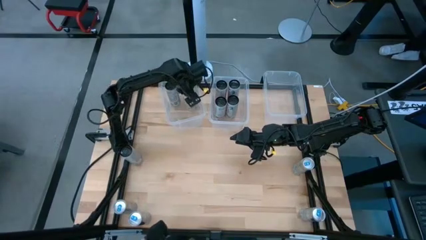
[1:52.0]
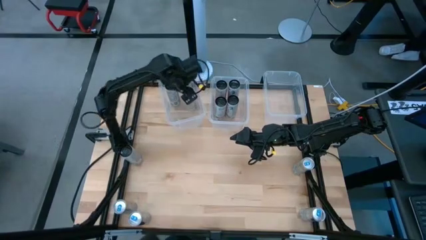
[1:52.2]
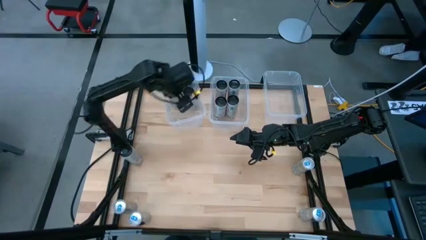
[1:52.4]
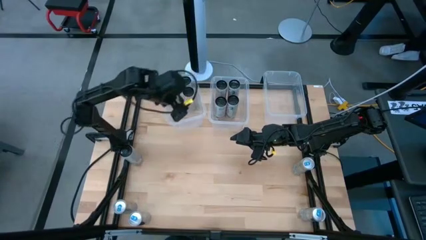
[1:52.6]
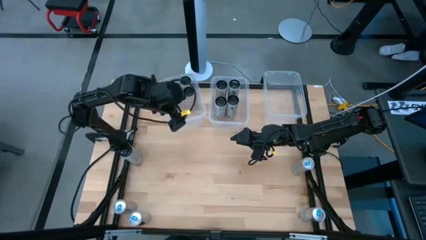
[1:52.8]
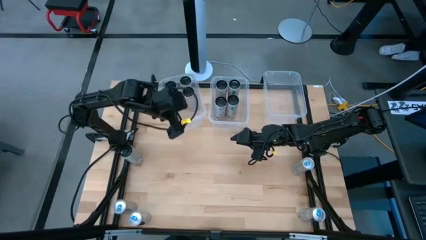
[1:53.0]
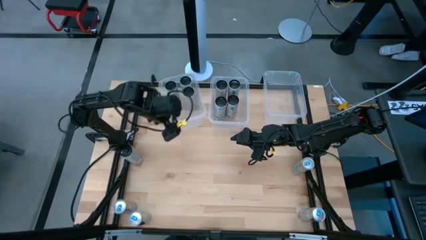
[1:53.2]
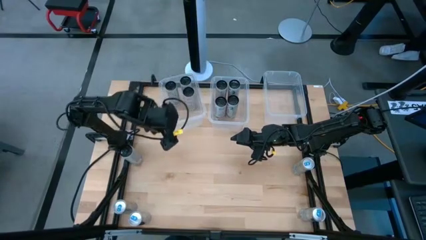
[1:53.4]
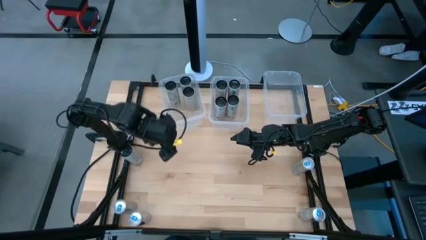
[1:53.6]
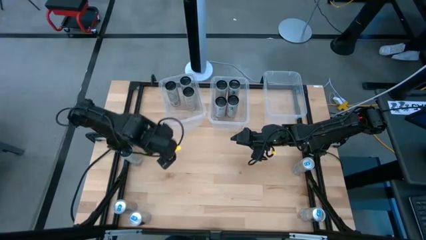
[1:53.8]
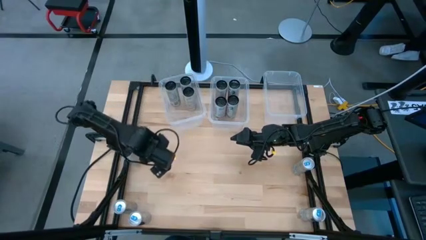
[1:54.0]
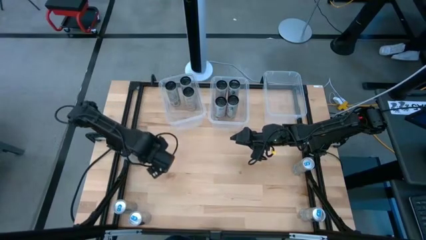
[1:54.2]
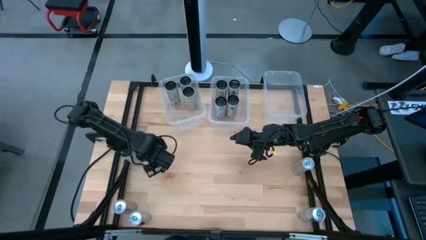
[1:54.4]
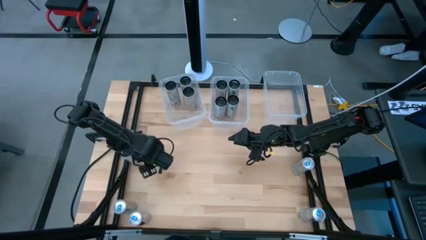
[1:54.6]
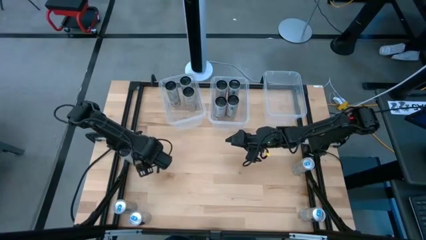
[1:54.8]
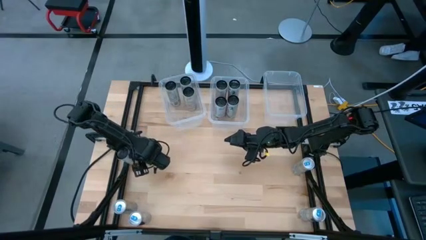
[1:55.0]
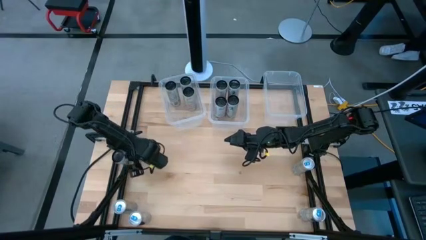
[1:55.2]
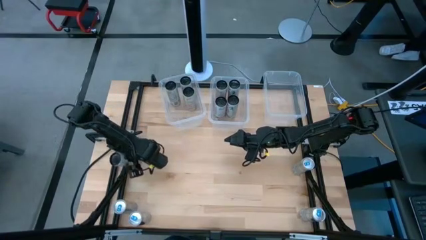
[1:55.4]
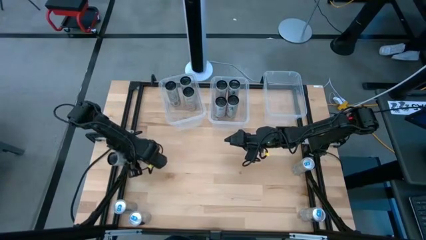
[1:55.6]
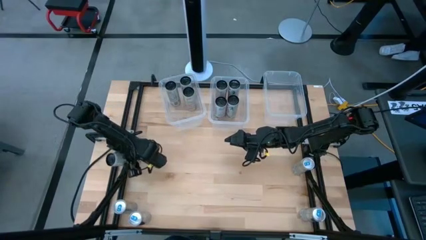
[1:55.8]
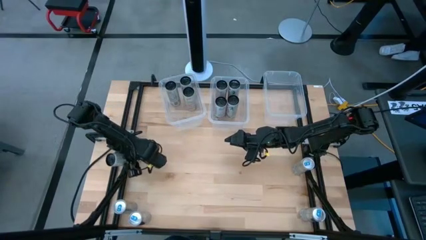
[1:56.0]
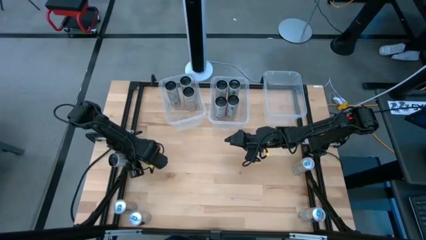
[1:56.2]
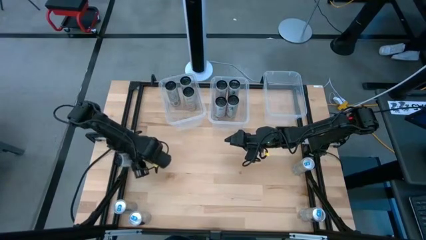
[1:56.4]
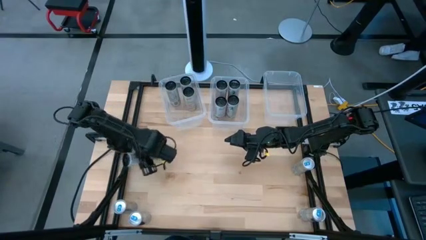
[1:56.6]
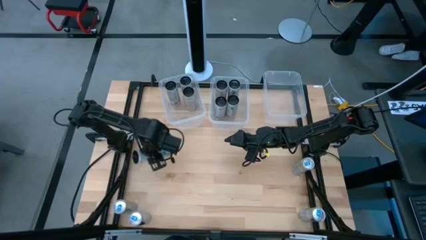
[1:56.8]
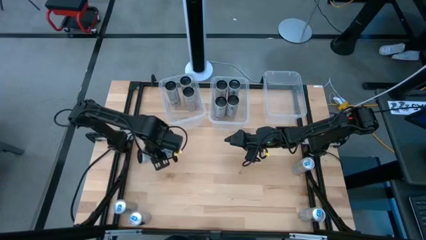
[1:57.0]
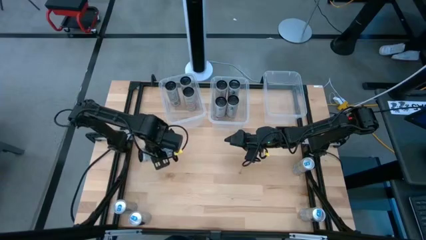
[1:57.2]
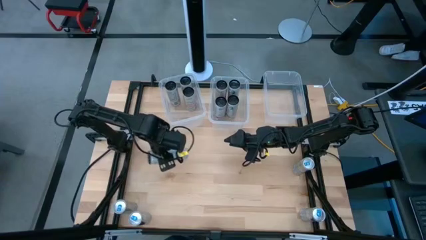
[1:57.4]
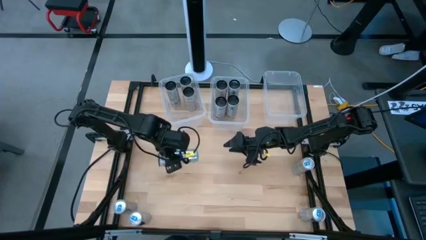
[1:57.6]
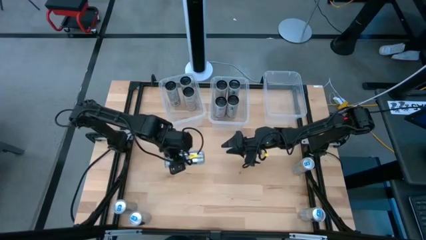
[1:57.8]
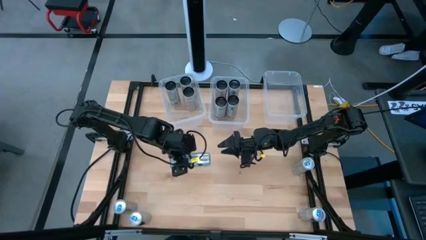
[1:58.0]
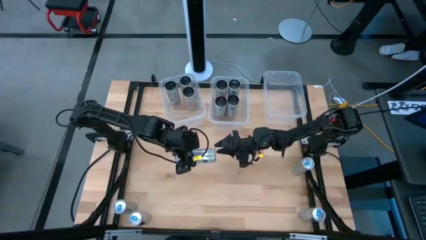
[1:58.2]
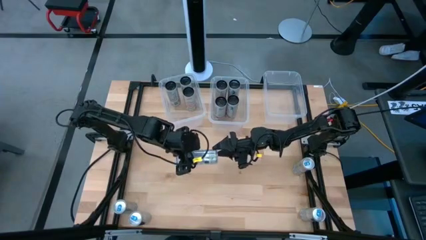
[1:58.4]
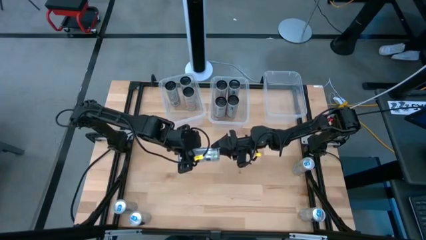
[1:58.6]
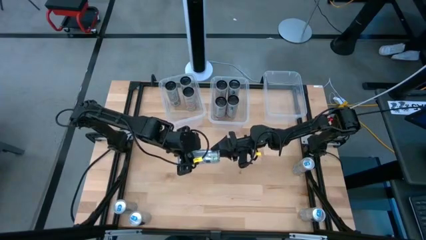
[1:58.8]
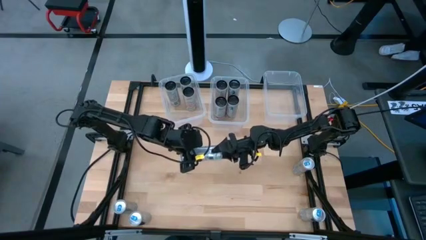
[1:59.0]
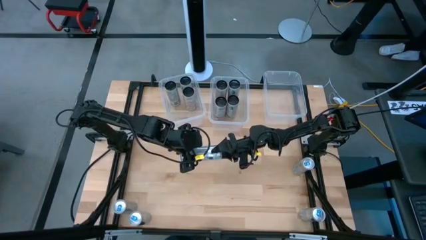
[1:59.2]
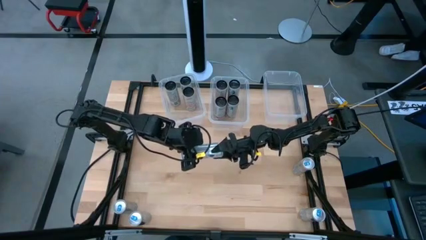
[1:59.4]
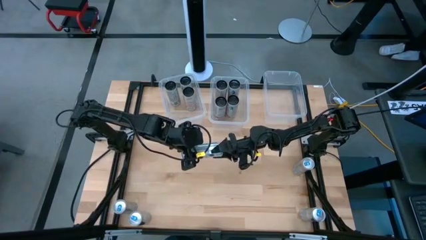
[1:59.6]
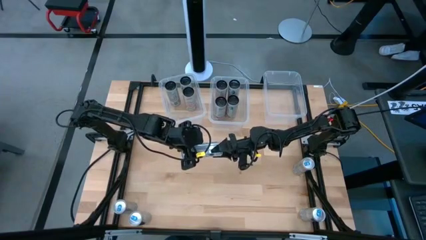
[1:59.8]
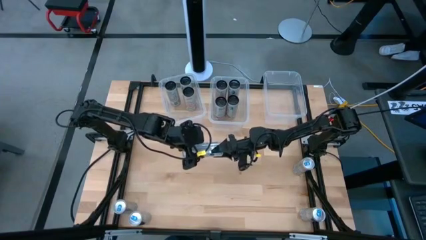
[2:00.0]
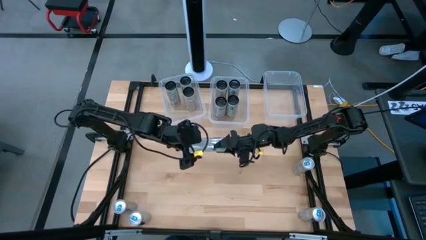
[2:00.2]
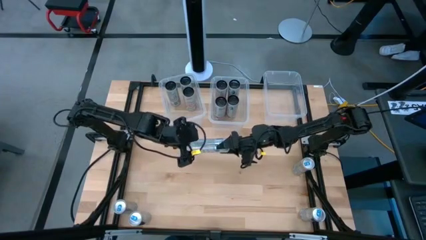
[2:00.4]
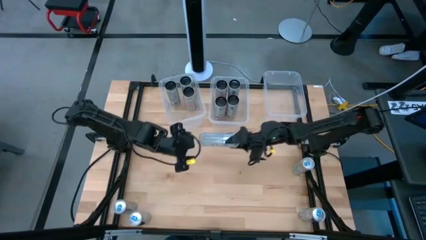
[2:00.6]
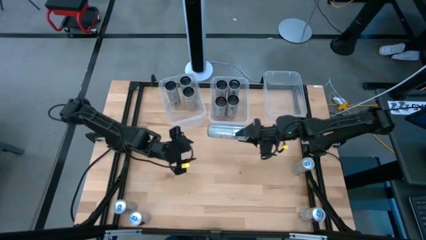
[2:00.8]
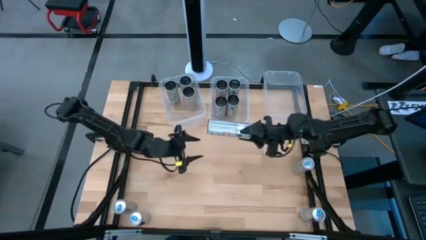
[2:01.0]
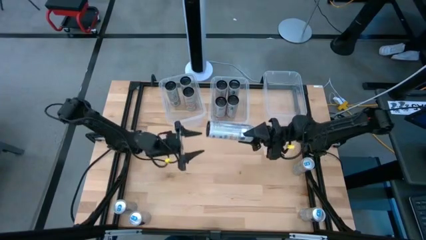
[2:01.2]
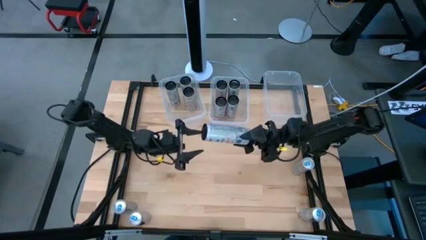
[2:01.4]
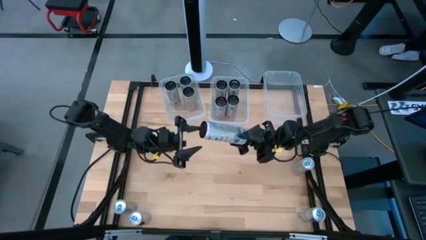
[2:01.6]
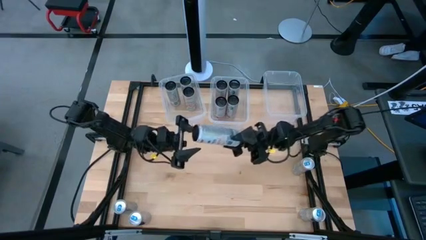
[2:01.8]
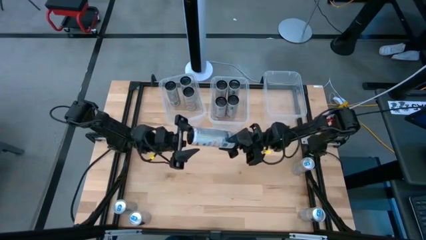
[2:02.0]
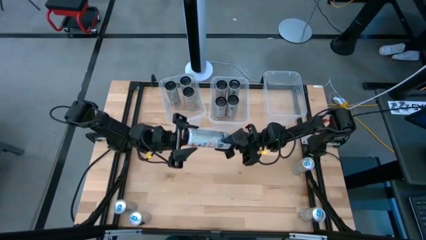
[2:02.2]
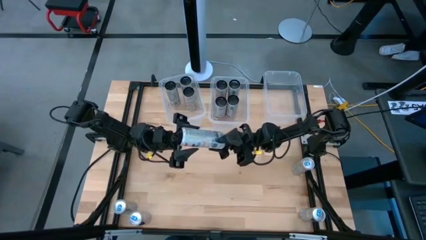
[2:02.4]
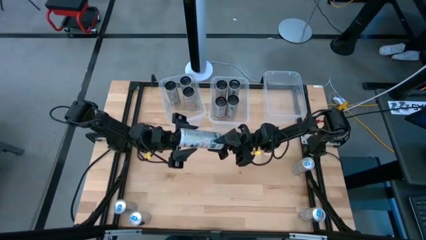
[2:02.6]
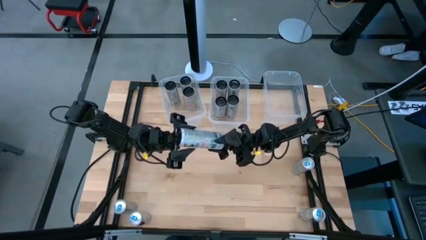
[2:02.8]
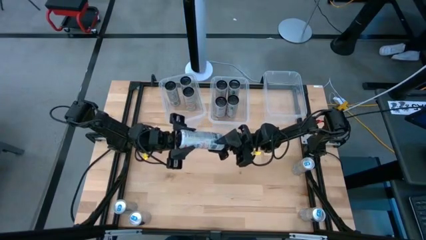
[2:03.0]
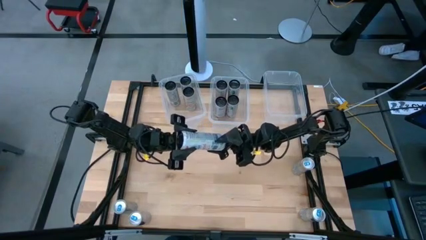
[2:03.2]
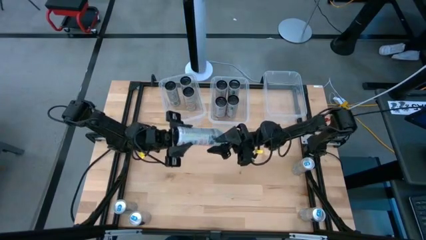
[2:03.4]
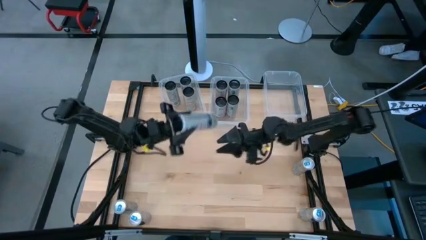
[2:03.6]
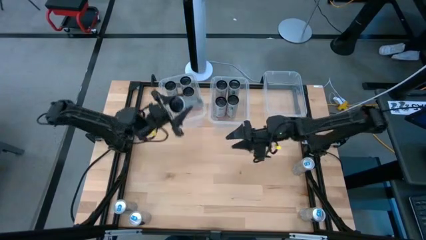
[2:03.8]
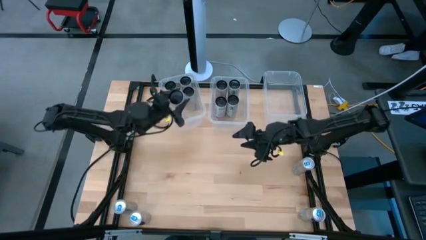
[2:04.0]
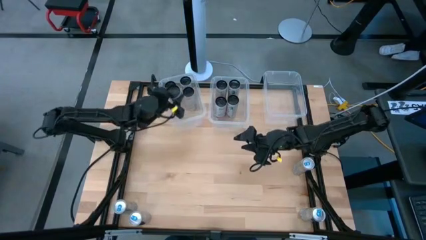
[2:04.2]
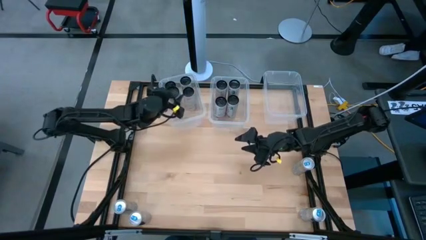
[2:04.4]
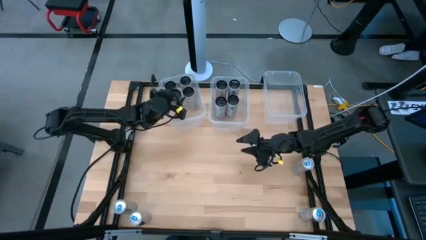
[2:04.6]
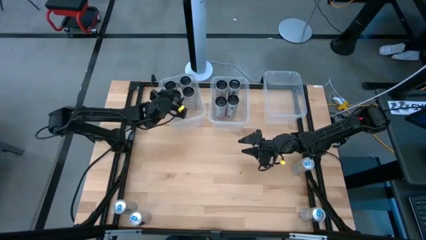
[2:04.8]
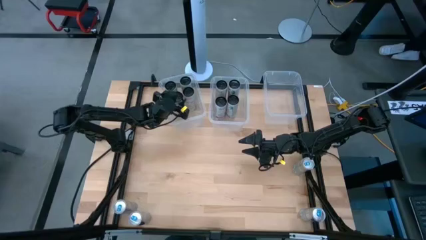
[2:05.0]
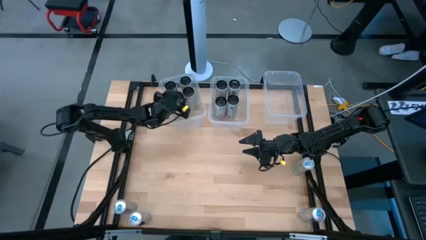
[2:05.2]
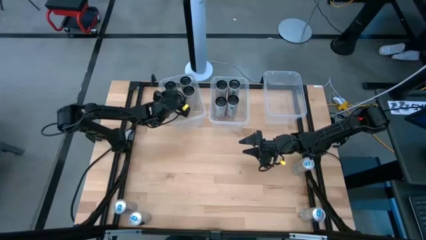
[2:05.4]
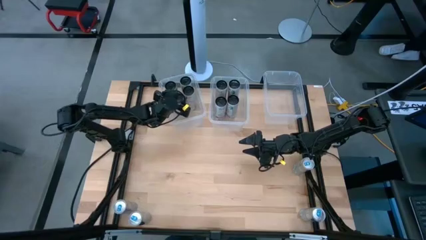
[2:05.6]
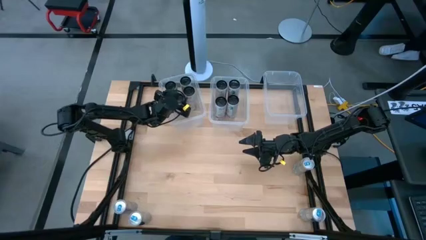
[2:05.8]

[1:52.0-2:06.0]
Task: Sort soda cans
Put the white and black starfruit soda can into the left transparent bin

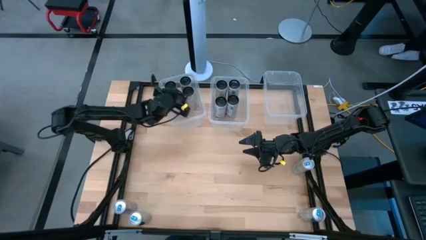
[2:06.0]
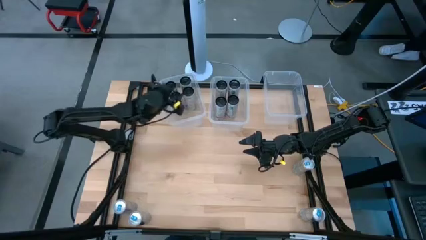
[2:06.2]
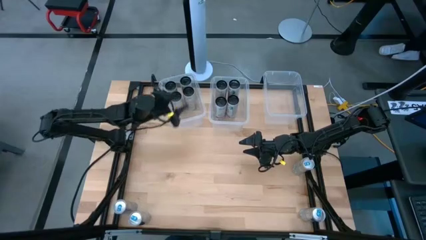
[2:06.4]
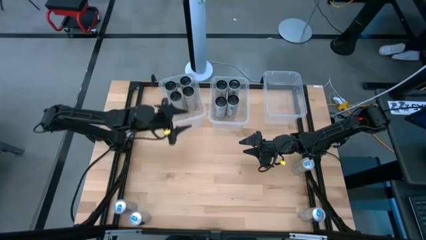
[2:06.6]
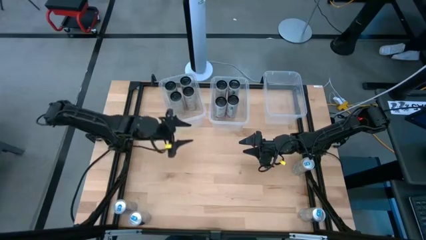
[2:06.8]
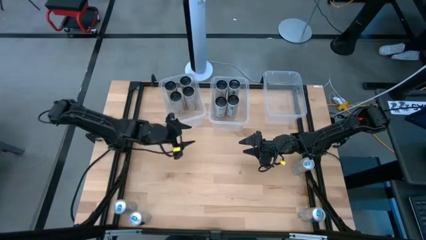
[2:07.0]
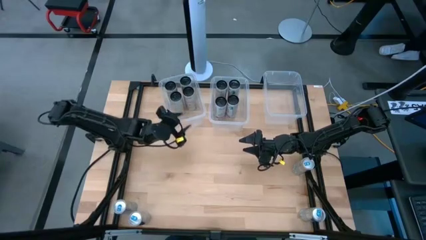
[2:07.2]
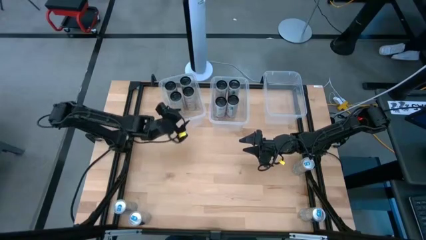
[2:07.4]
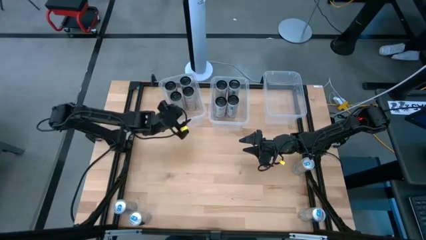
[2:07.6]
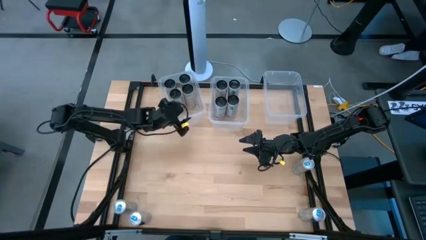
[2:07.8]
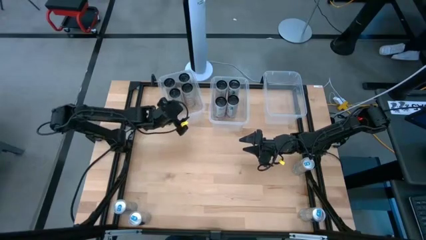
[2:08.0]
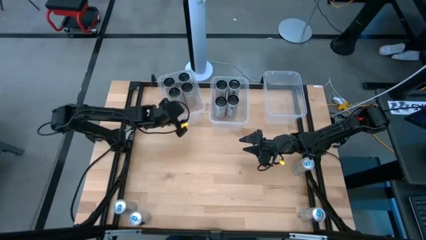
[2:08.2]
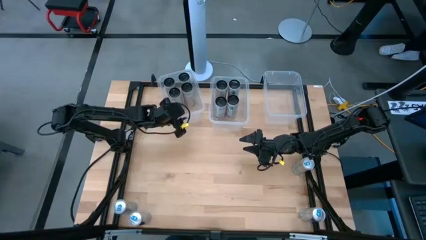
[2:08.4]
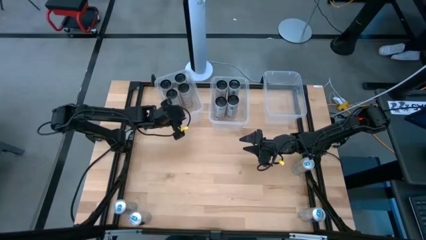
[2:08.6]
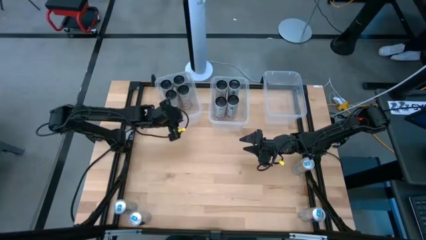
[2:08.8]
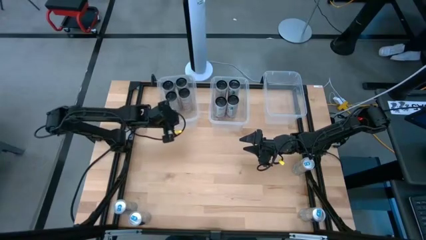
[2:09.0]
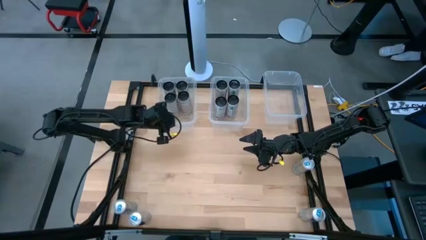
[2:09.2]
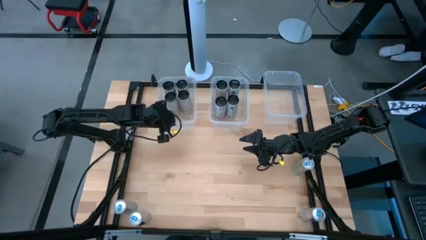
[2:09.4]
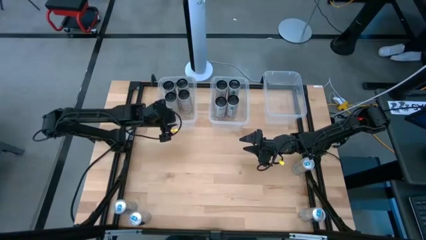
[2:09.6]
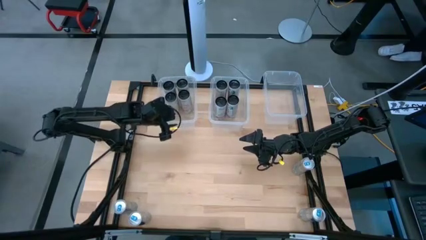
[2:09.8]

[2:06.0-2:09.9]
Adjust the left transparent bin
